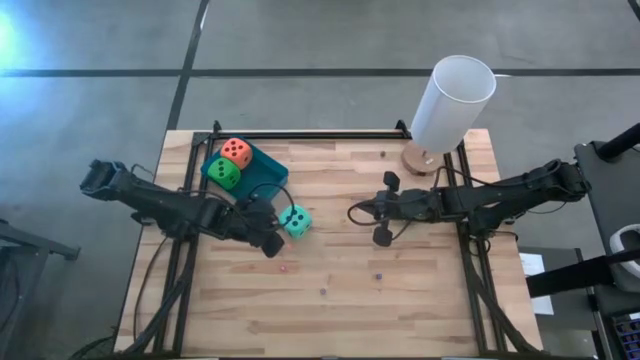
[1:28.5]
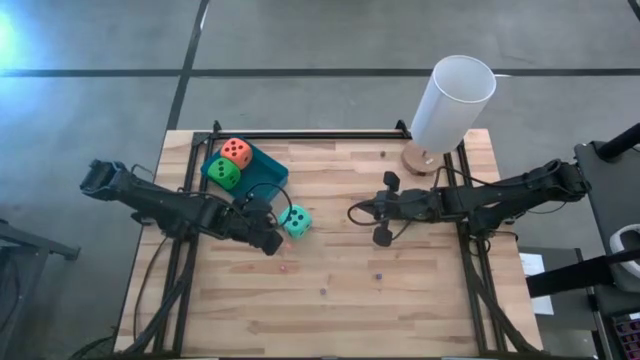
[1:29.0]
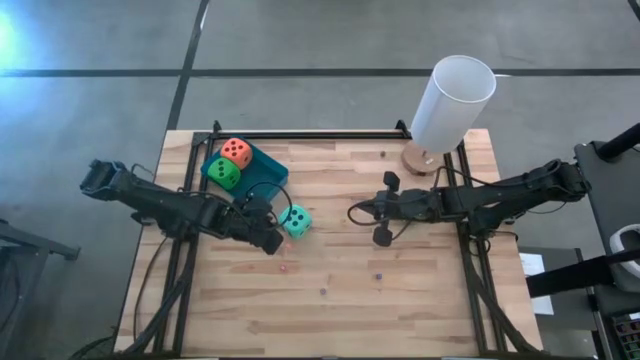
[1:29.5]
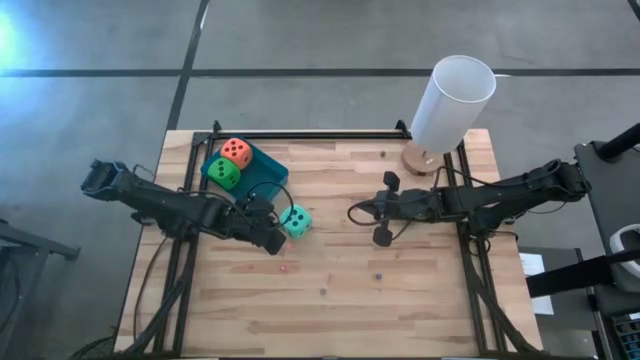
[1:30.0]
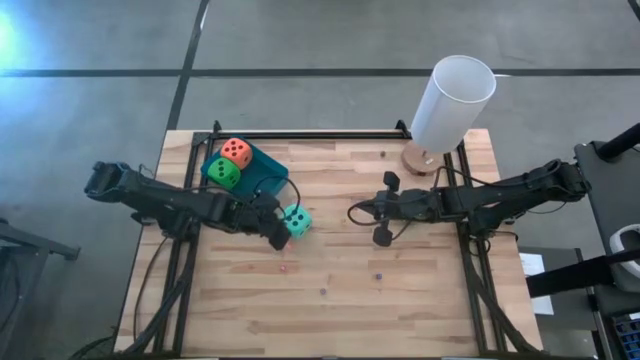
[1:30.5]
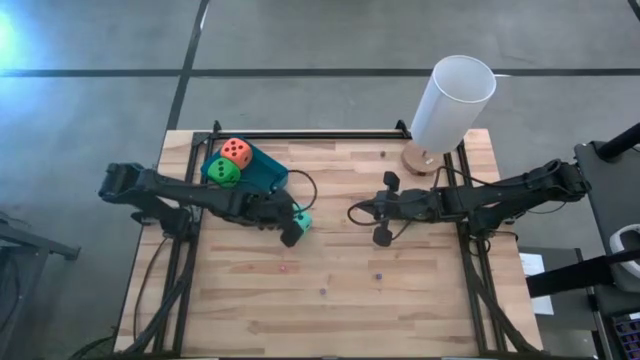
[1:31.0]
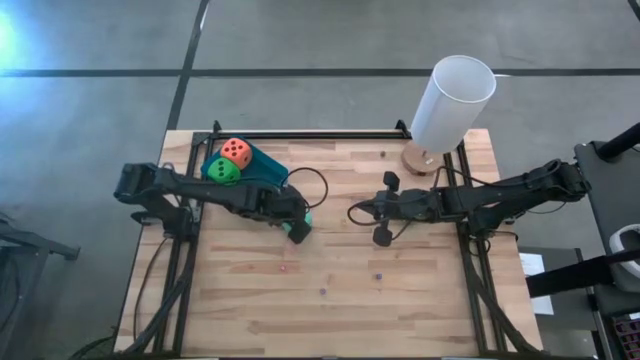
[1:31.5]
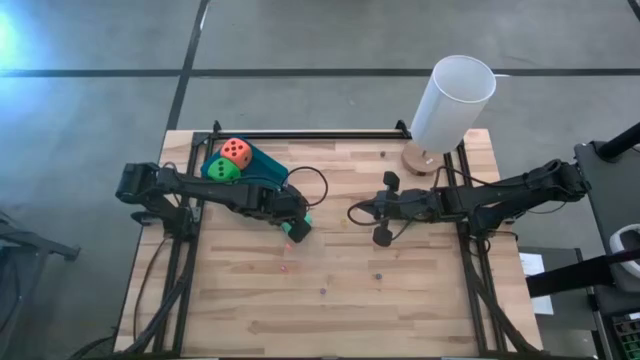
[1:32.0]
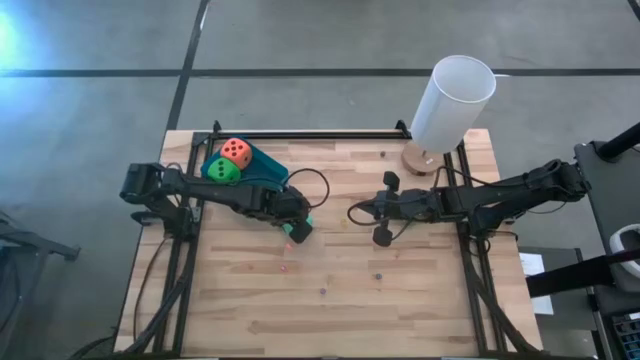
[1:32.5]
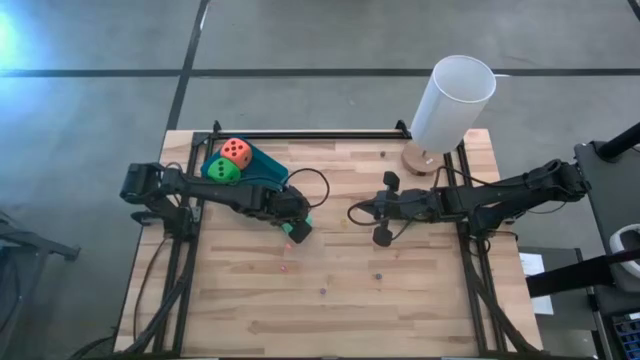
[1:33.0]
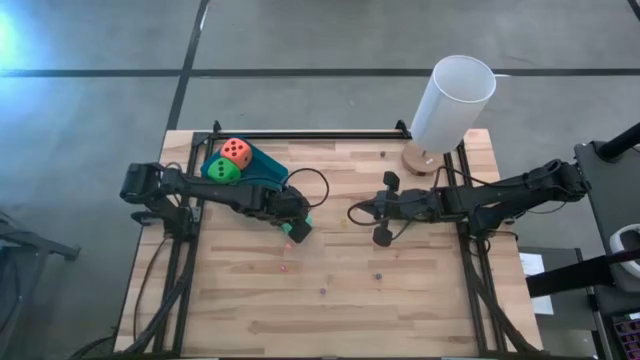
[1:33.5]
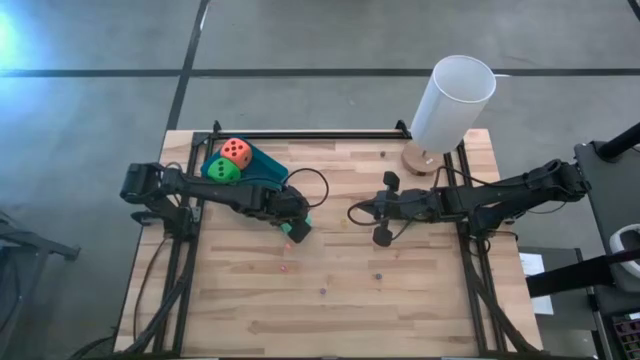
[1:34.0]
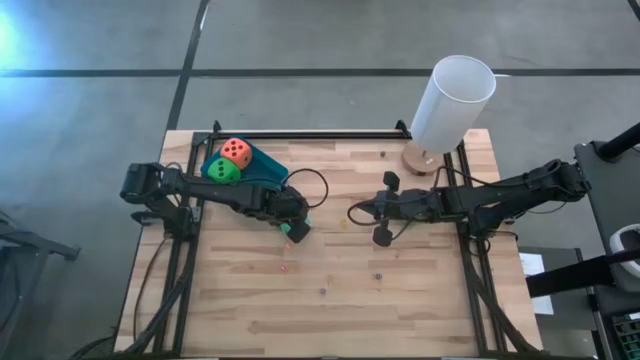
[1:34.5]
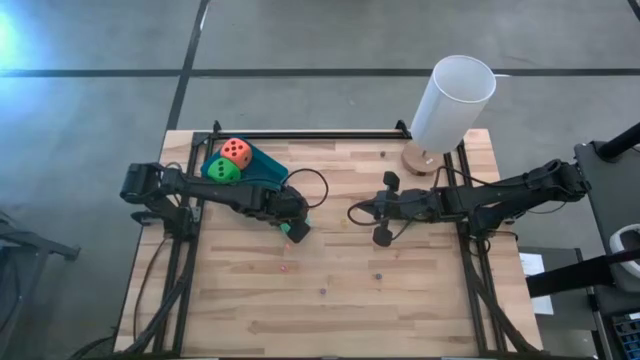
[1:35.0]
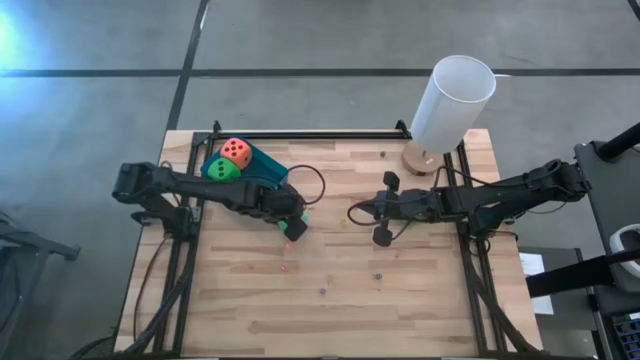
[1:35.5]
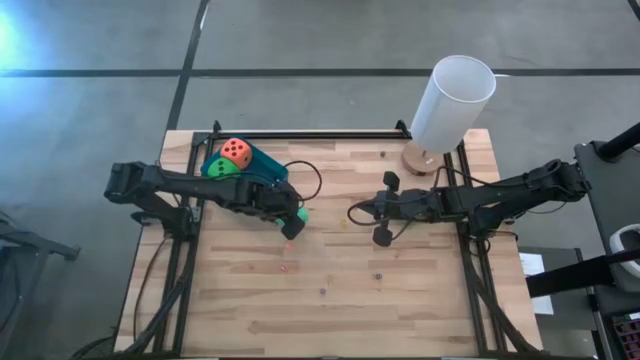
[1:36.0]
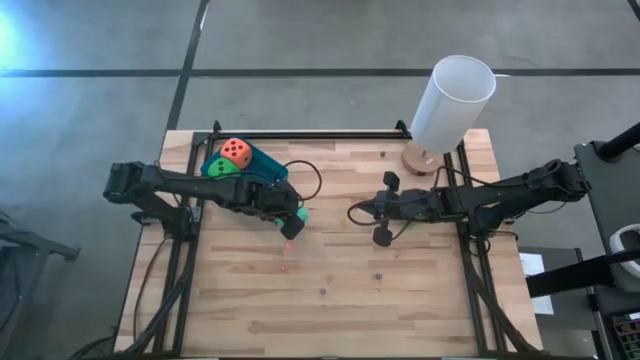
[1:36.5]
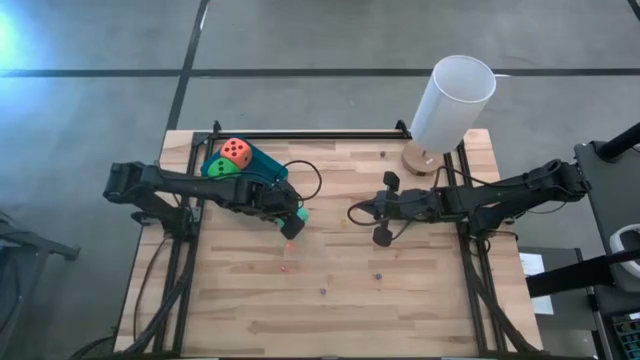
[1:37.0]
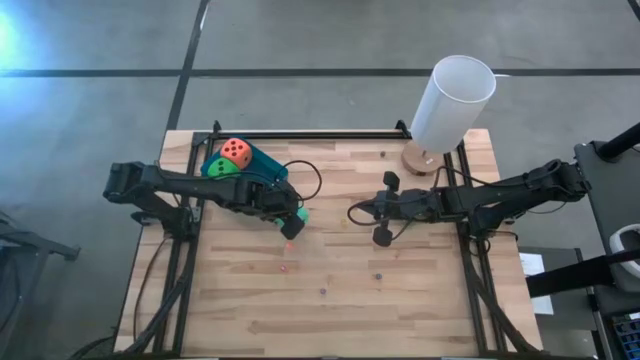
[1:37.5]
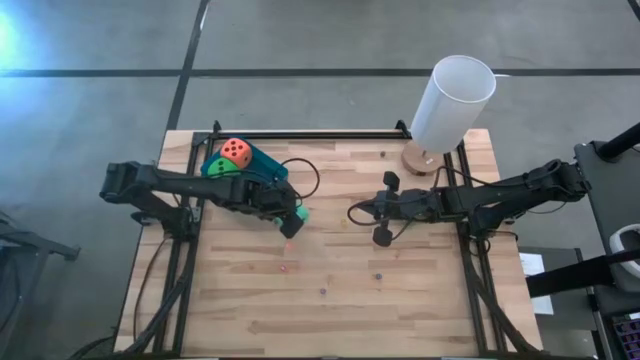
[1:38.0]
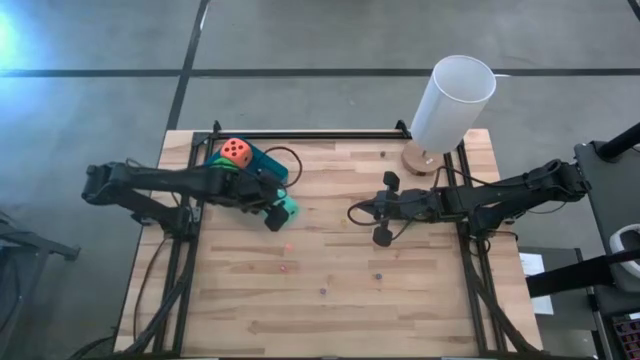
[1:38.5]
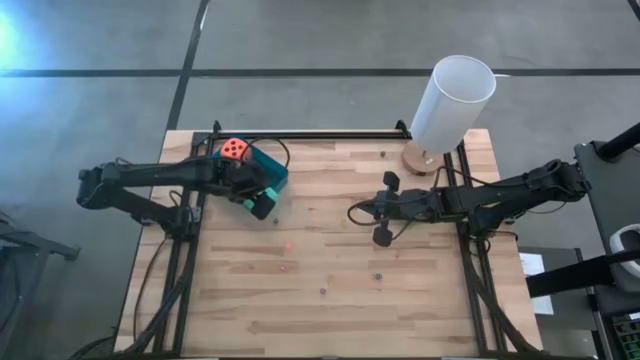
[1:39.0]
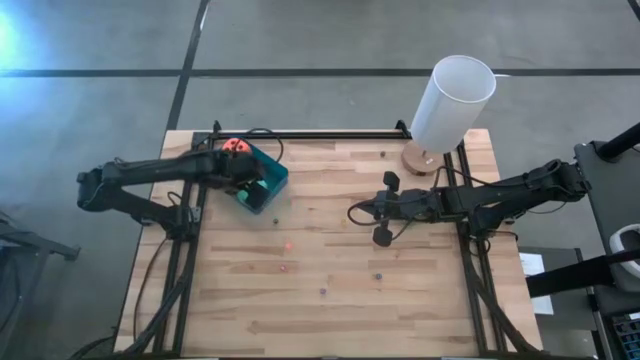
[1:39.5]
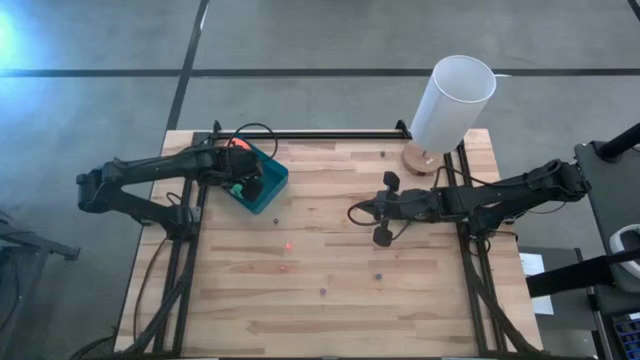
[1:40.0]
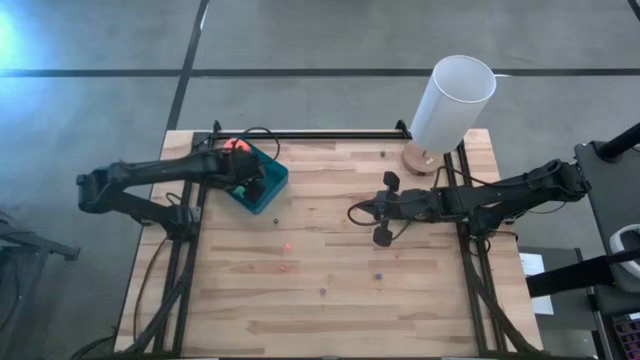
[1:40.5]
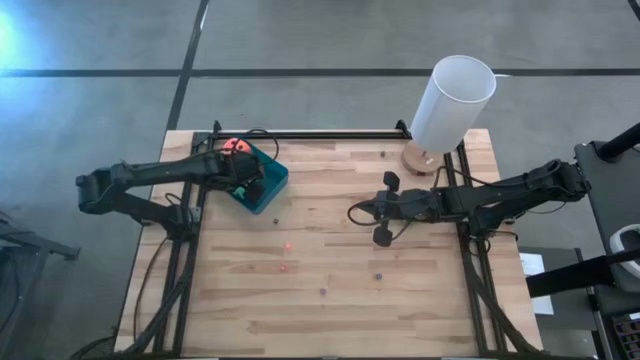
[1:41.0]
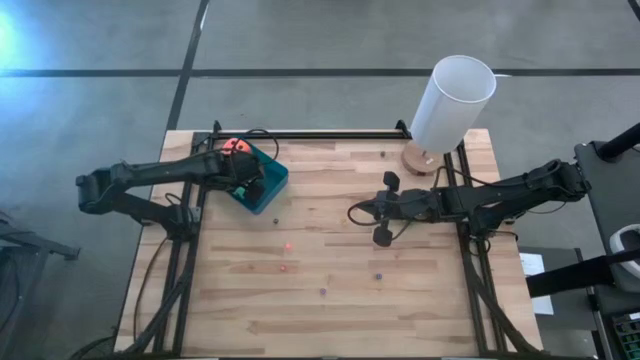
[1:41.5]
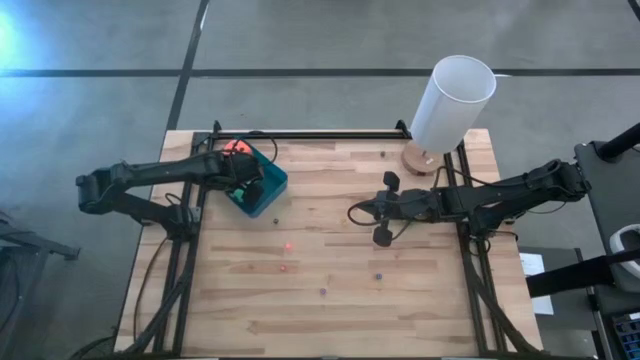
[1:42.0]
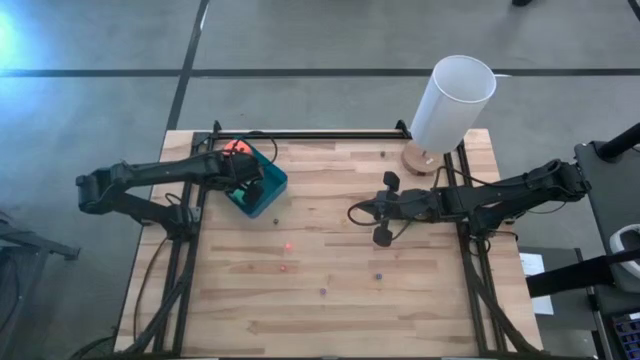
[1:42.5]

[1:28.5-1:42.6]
Task: Pick & Place Dice
Put the big blue dice into the blue bin

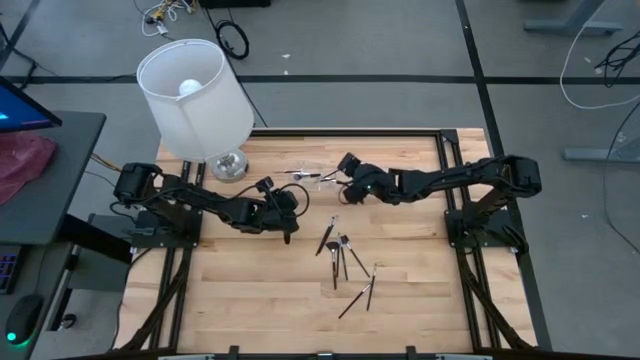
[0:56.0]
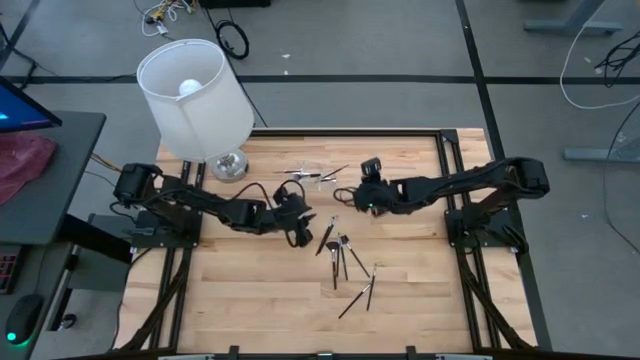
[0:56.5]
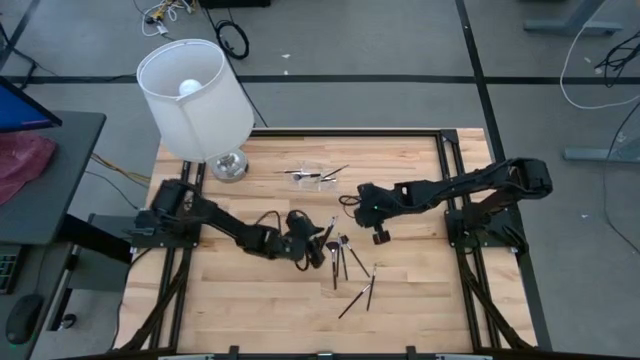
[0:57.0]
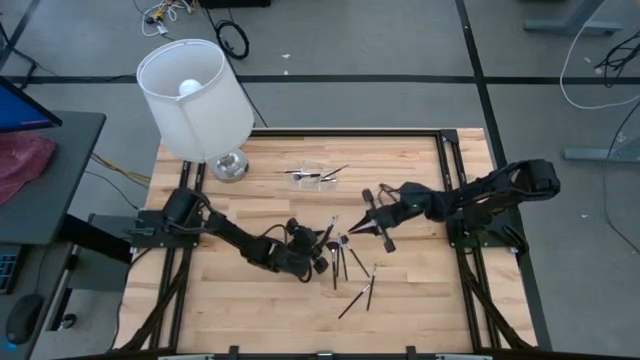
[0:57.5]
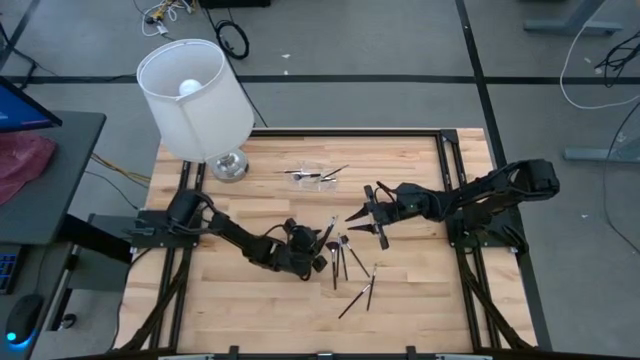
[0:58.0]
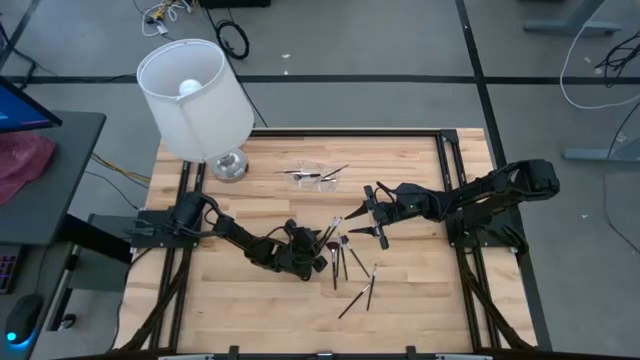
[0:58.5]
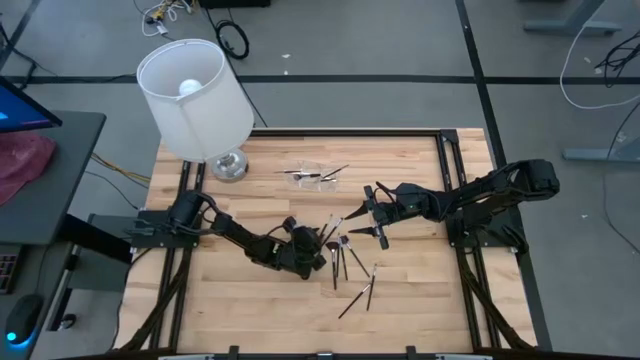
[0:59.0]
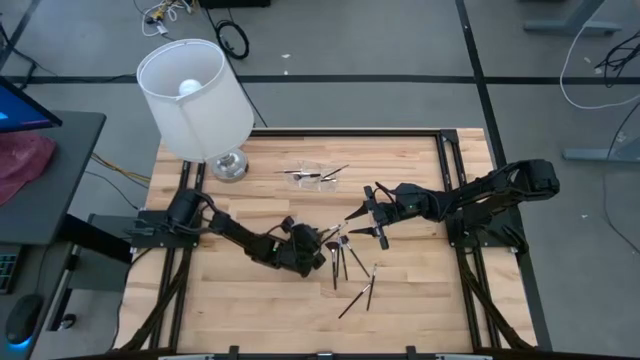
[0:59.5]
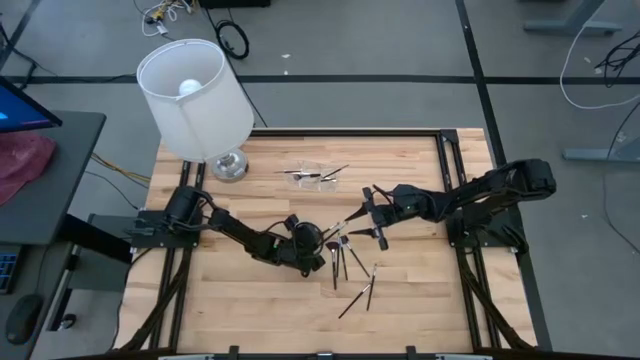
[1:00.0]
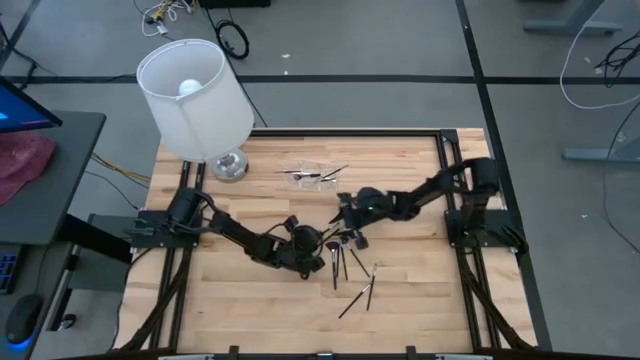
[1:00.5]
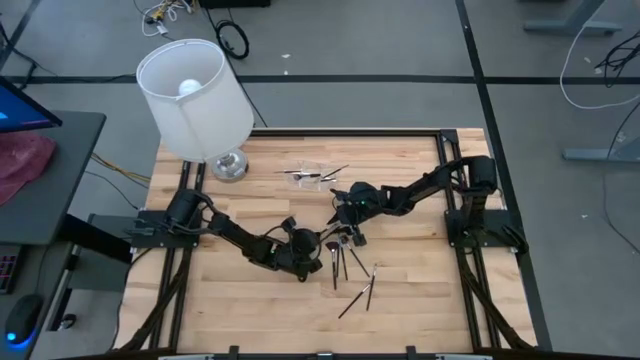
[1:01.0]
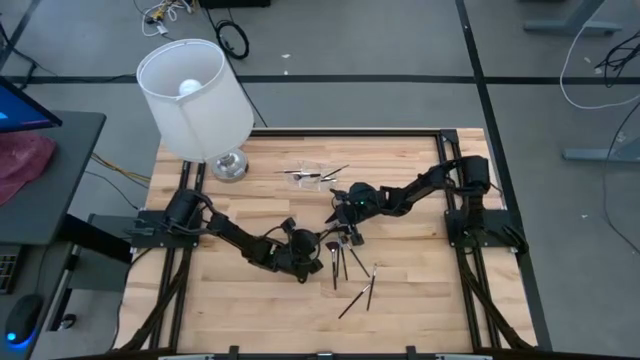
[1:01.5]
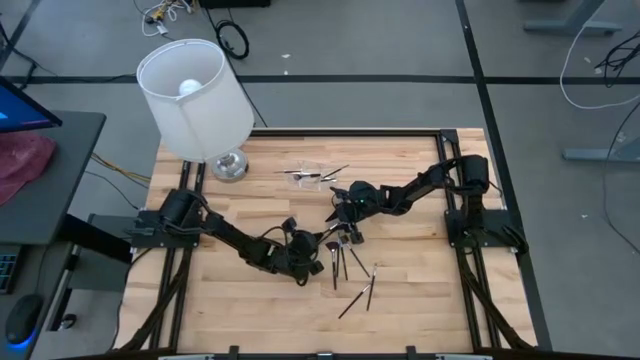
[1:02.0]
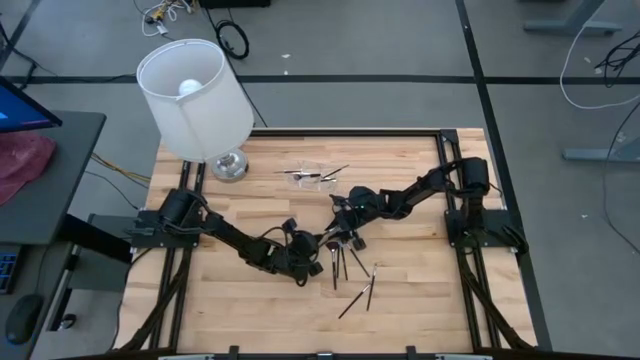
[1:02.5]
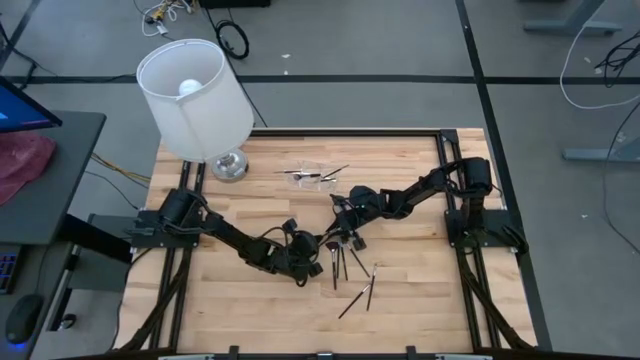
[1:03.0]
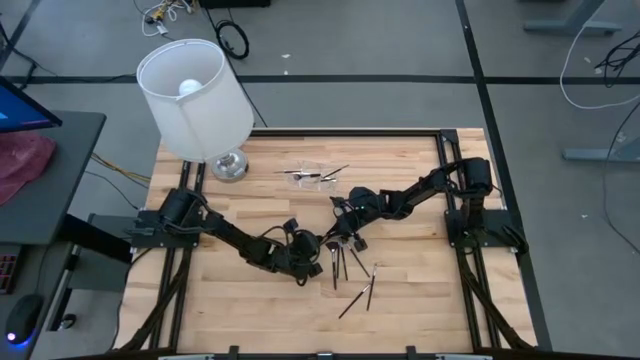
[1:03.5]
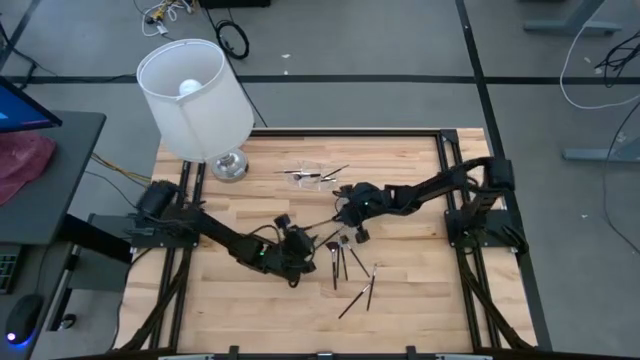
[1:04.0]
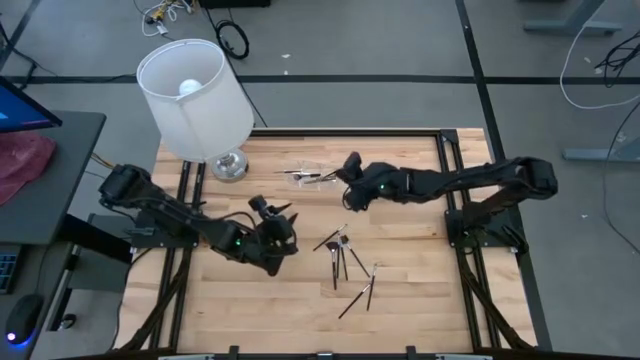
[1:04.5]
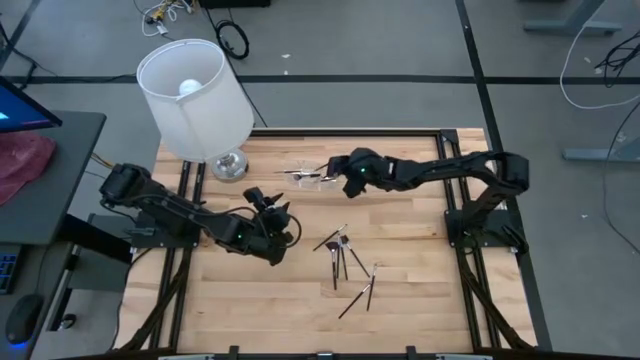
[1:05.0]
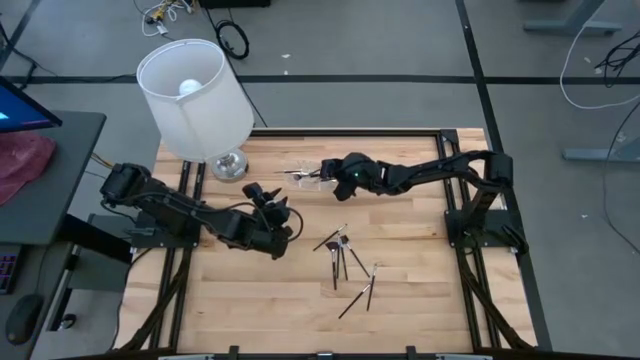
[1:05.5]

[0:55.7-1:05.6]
Task: Put items in baskets/containers
Put the black eyeshadow brush into the transparent organizer
